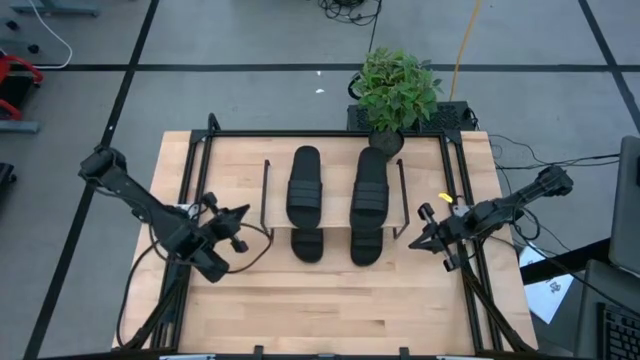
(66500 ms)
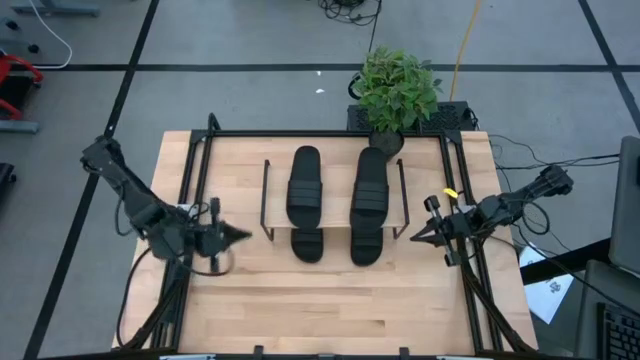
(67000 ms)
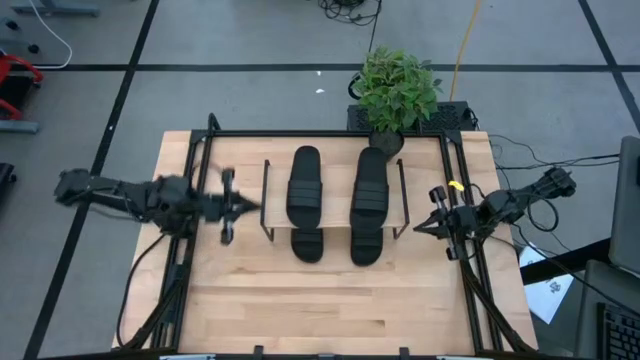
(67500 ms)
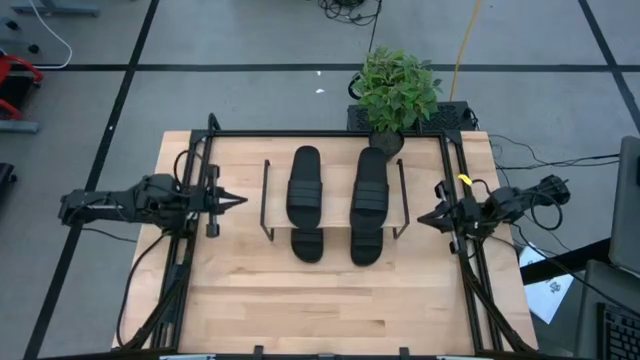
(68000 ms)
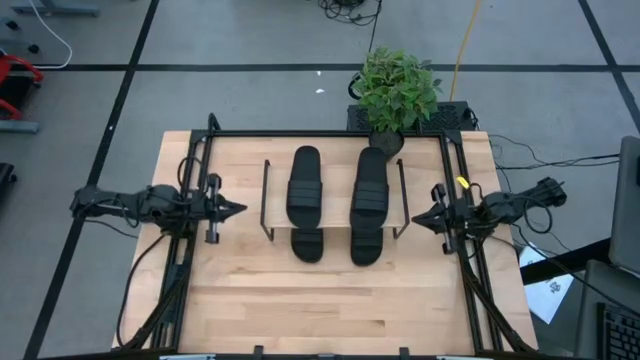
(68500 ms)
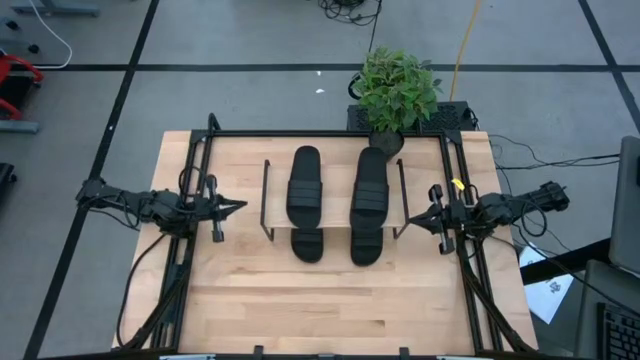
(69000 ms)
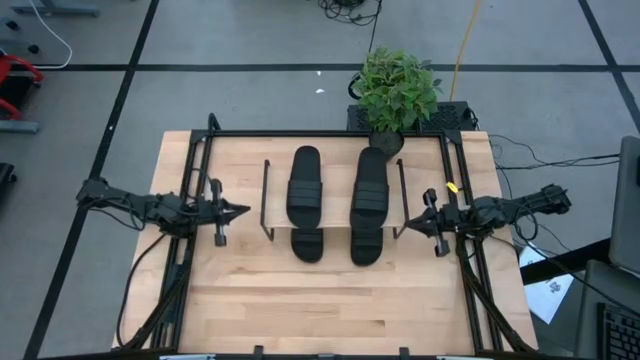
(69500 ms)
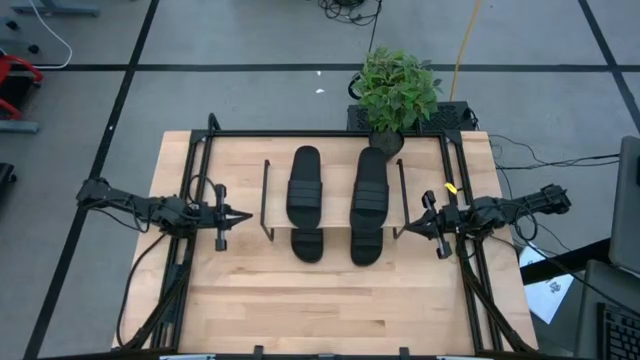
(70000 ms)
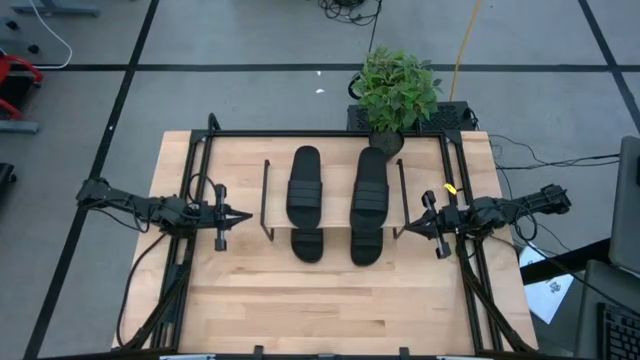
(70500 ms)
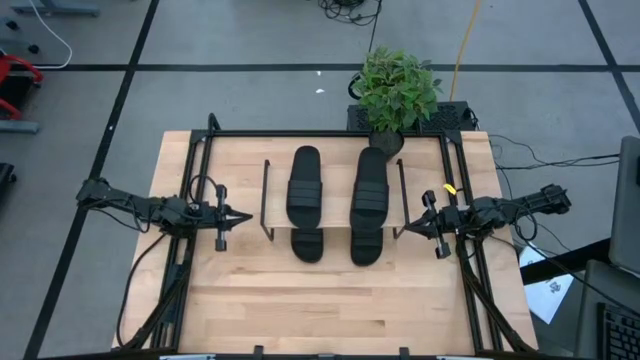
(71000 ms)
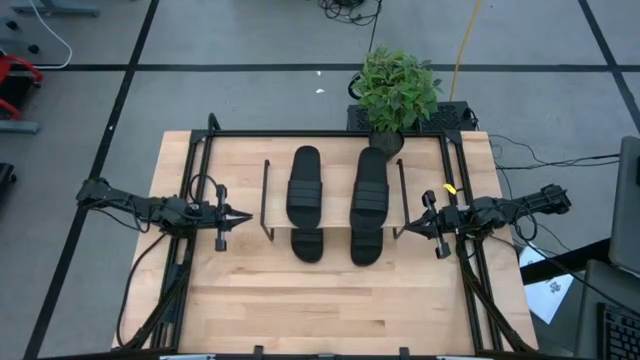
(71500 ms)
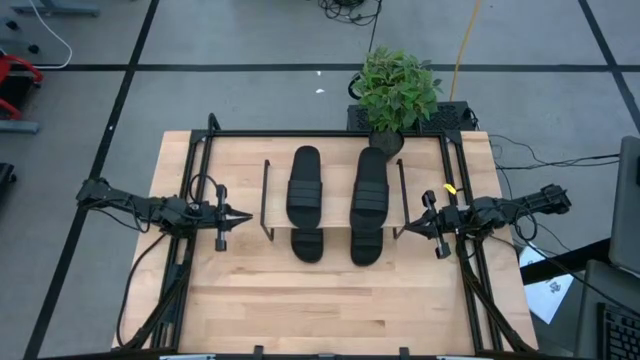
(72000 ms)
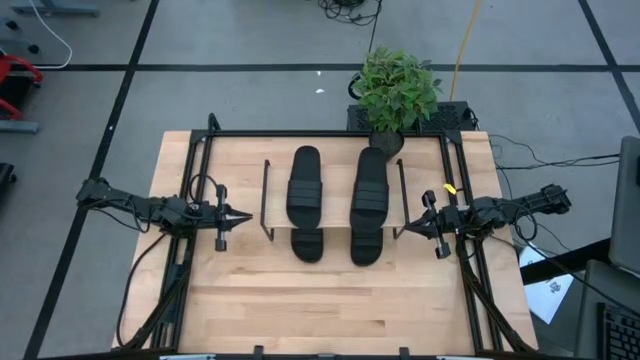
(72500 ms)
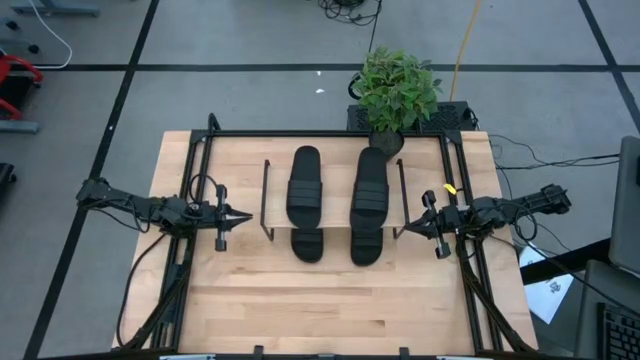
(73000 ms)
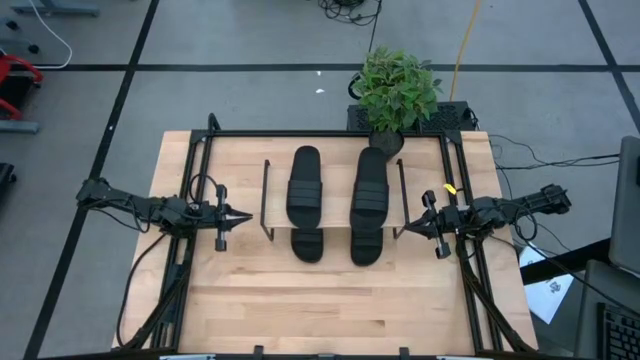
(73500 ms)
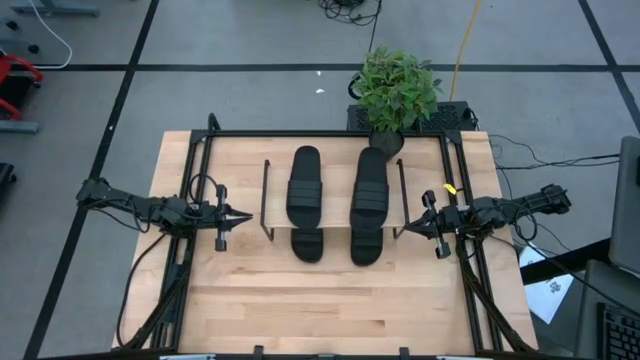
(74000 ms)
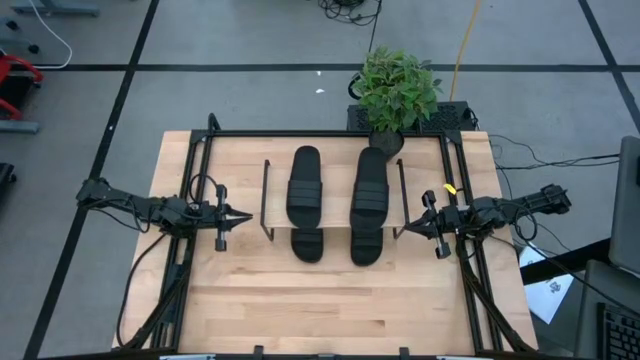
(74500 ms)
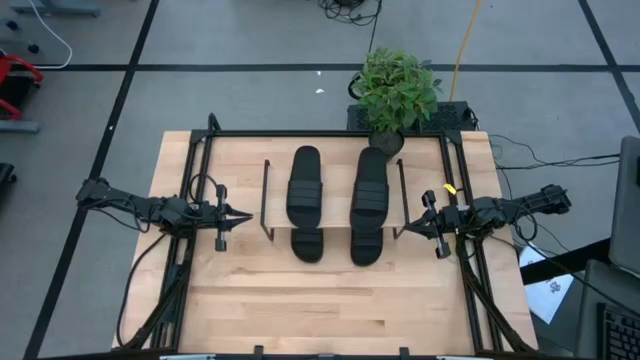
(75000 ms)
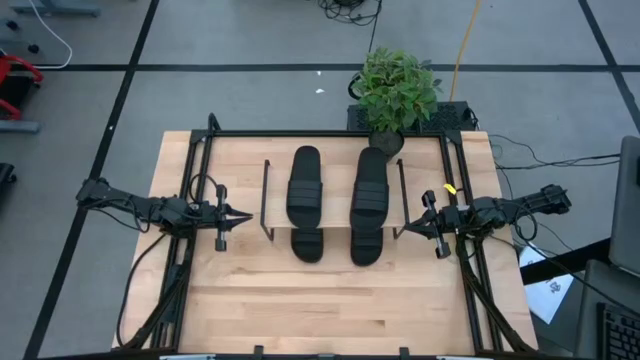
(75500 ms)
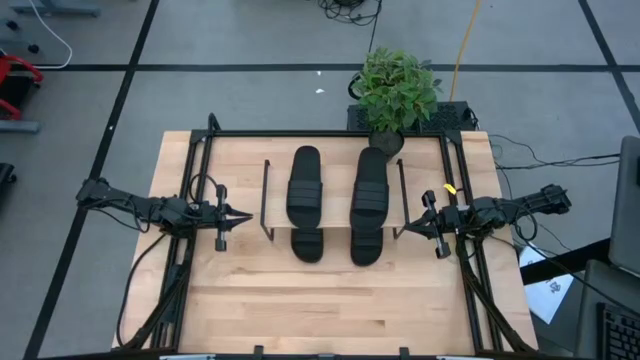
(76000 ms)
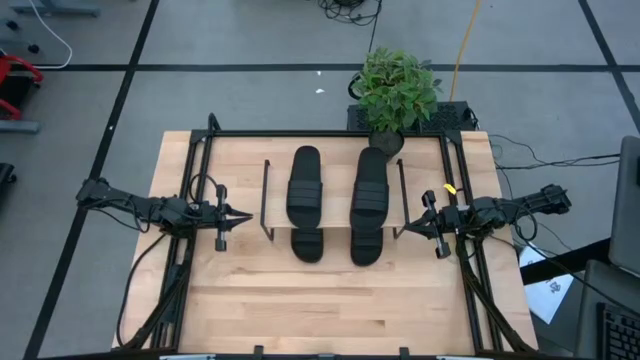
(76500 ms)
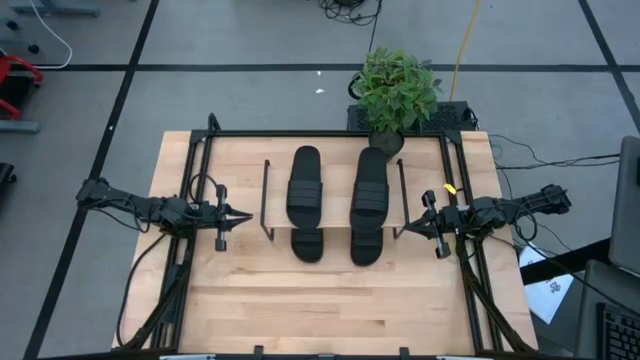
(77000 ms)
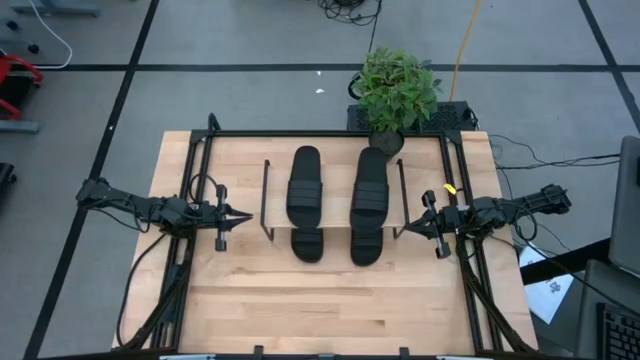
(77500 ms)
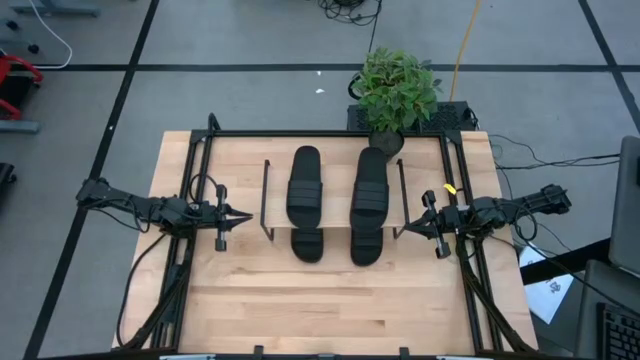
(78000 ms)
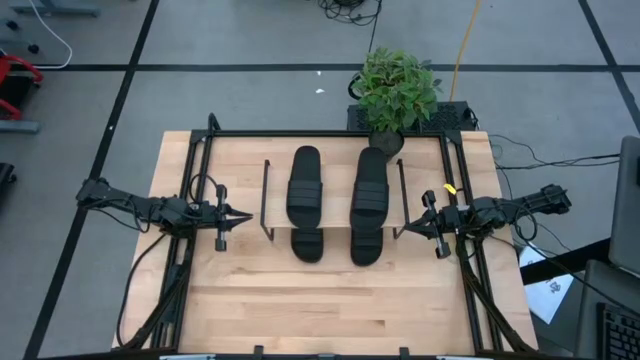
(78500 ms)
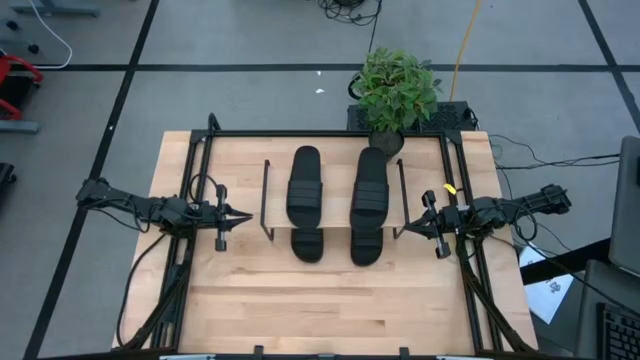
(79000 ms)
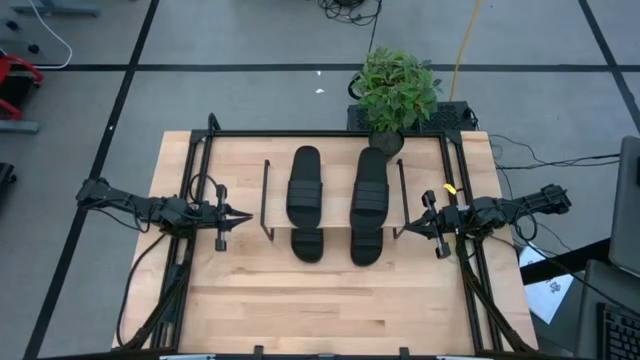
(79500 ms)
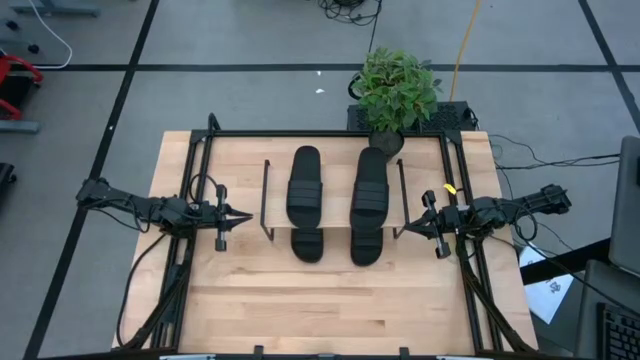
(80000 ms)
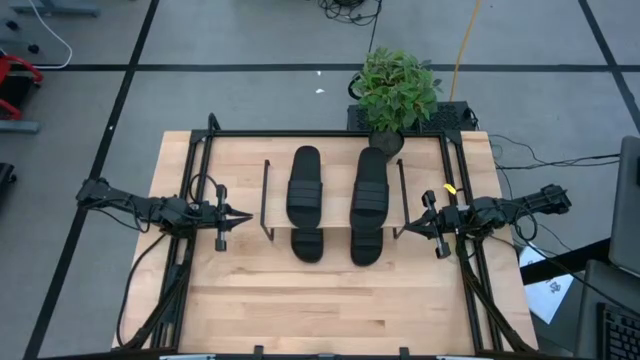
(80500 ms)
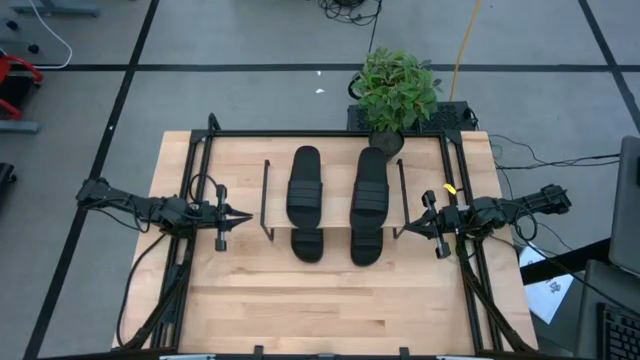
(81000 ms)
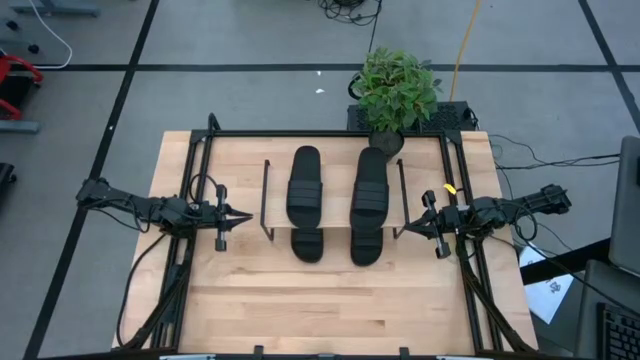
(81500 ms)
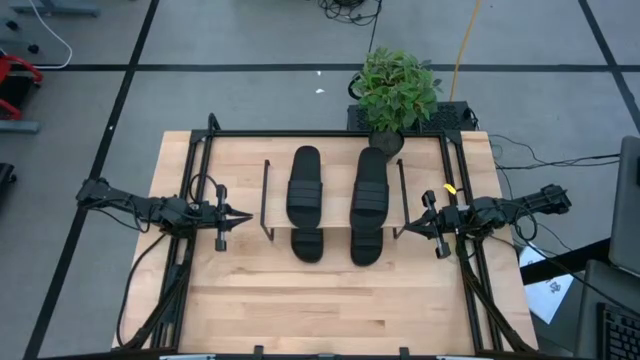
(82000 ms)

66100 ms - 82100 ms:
Task: Pick and place slides into the shelf
Return to Home Position

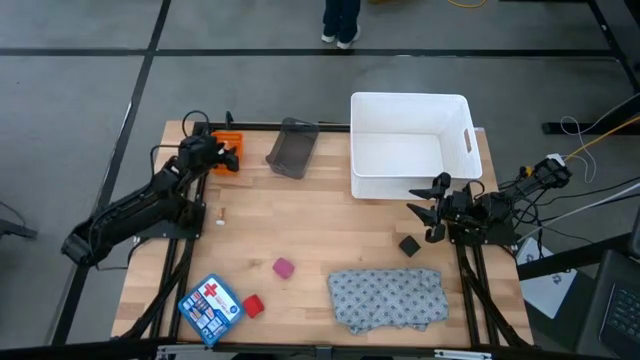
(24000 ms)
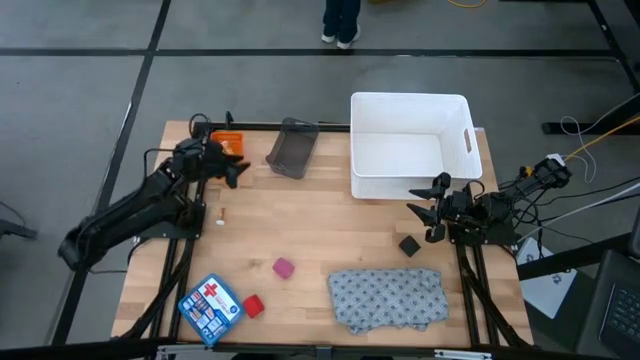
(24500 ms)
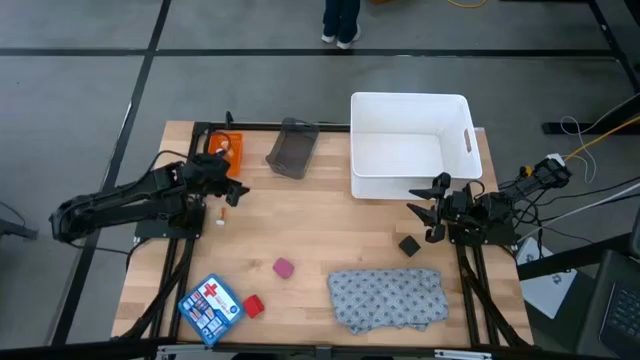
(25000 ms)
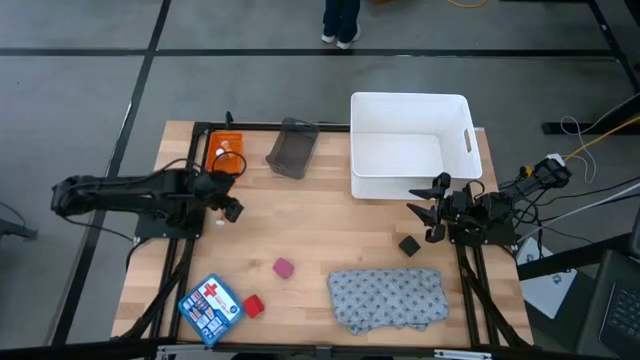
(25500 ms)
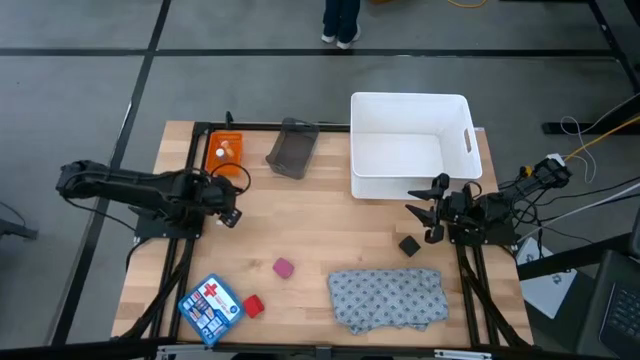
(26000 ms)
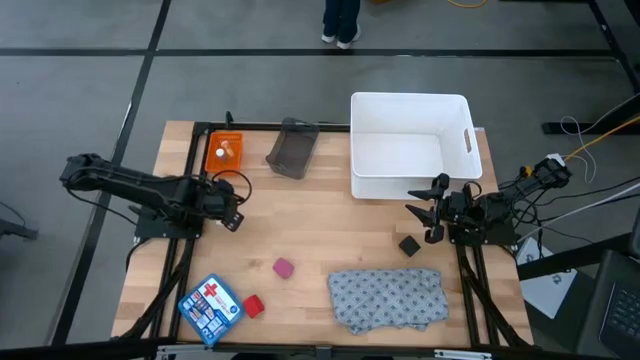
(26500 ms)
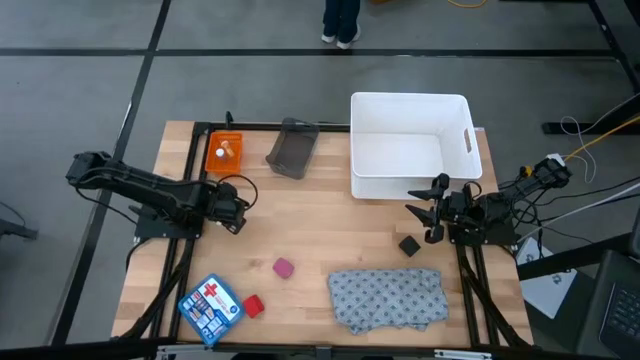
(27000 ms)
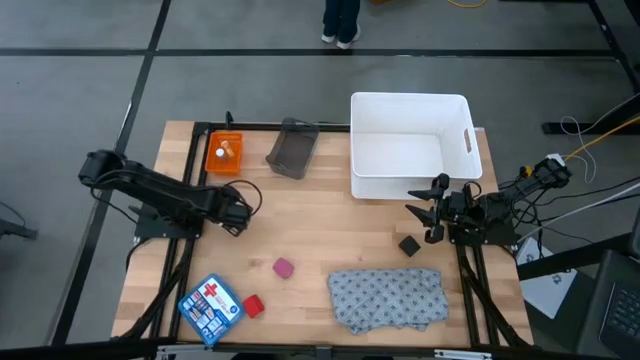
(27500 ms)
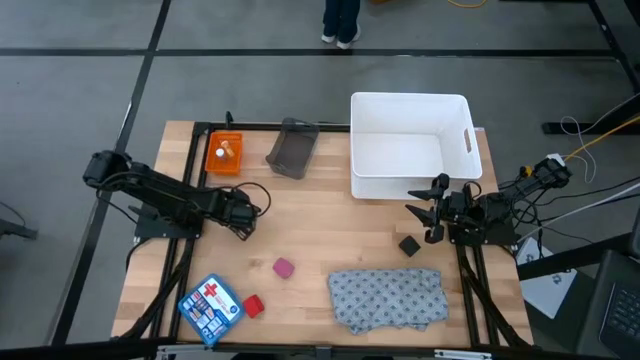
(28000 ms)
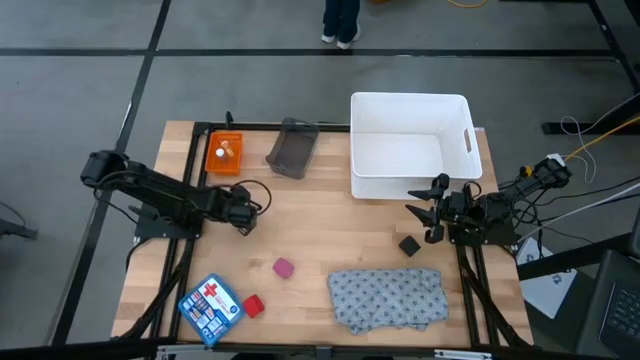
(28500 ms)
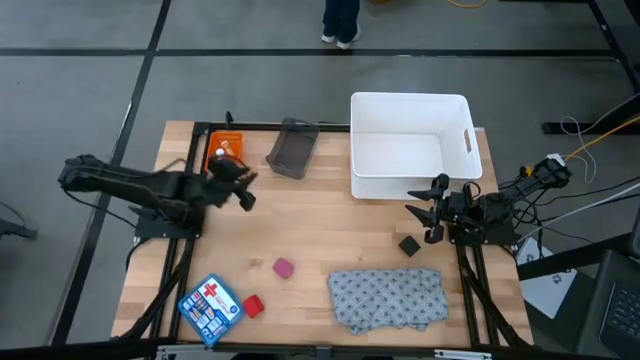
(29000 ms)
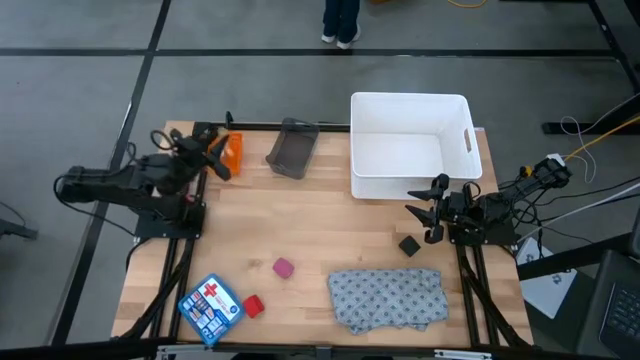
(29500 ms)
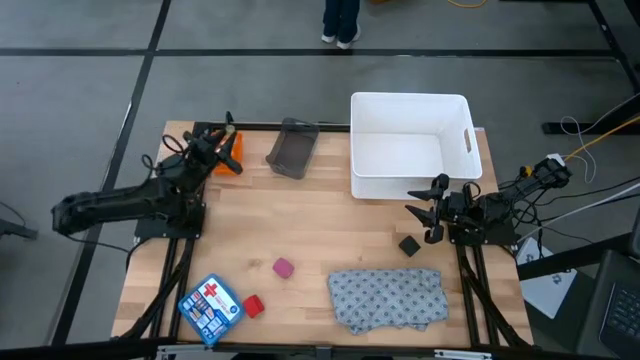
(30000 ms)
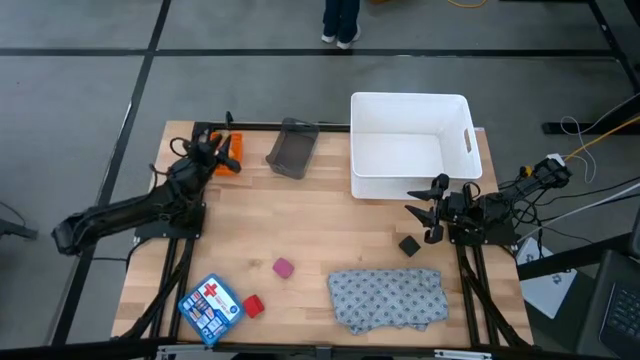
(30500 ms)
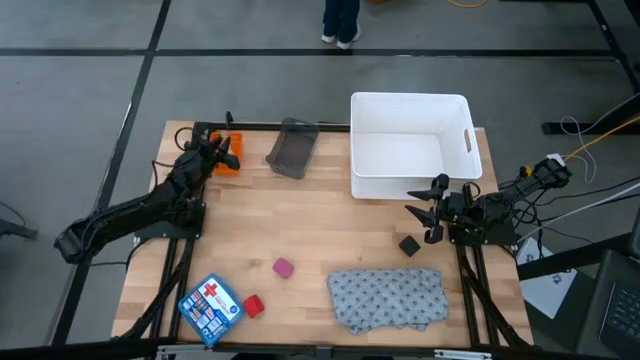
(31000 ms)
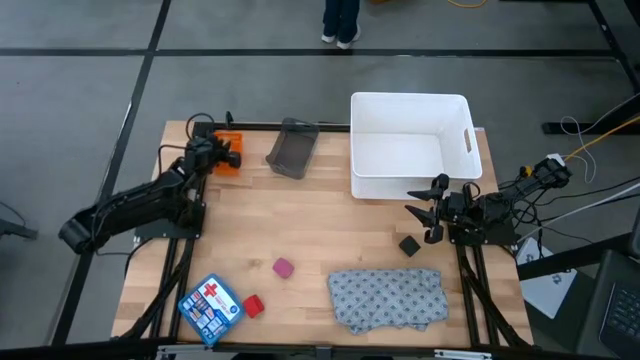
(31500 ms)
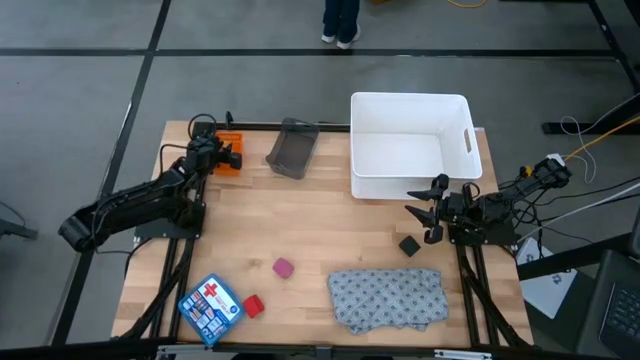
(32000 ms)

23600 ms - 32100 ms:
Task: Pick & place medical supplies in basket/bin
Put the yellow pill bottle into the orange bin
